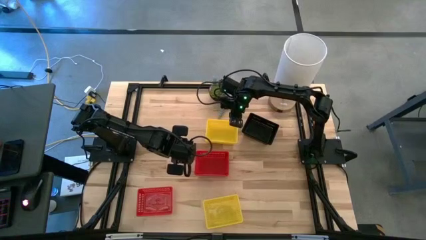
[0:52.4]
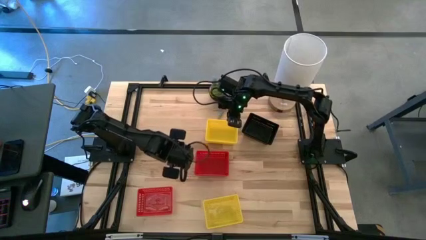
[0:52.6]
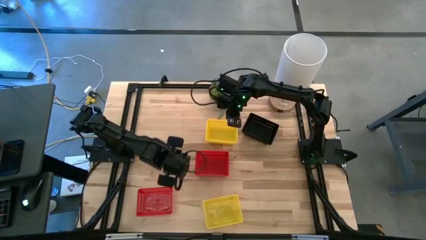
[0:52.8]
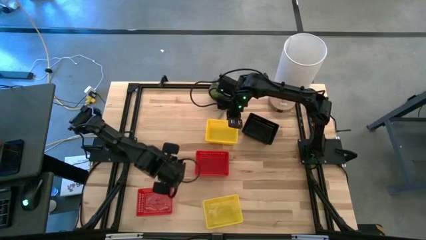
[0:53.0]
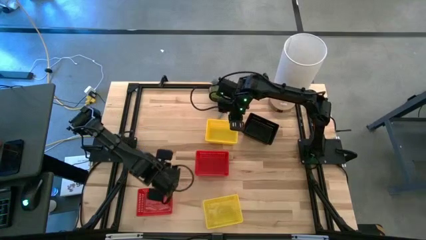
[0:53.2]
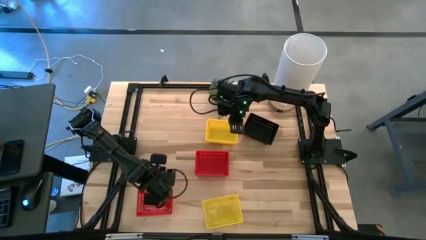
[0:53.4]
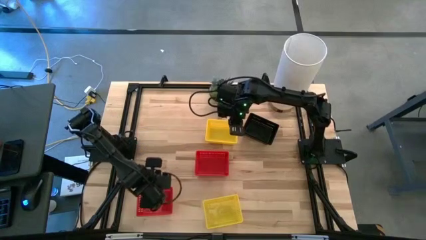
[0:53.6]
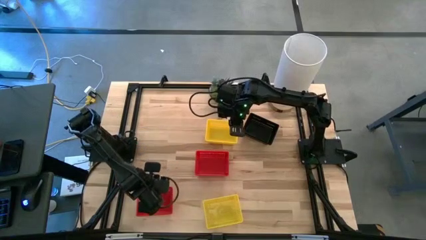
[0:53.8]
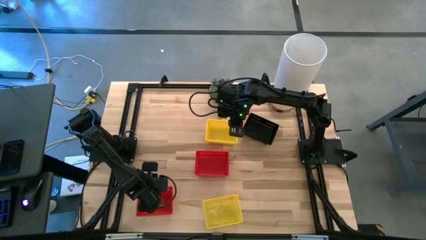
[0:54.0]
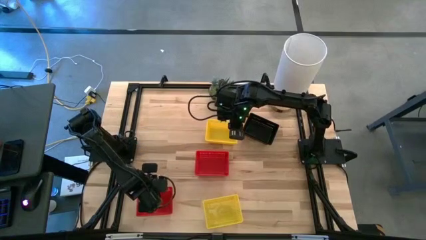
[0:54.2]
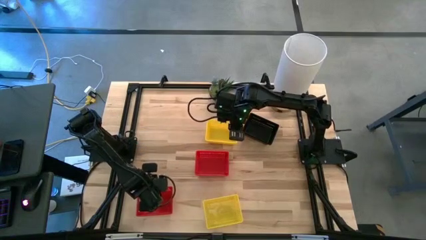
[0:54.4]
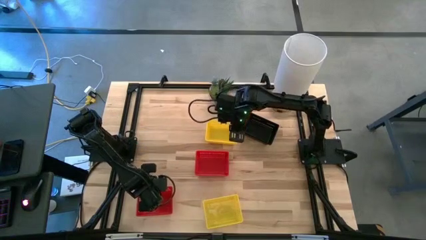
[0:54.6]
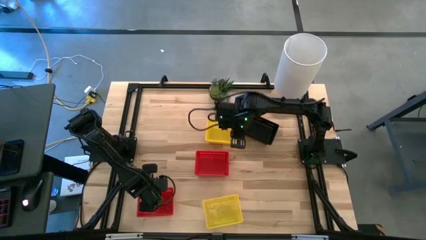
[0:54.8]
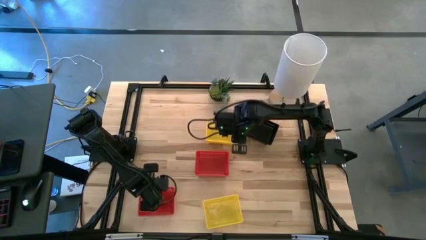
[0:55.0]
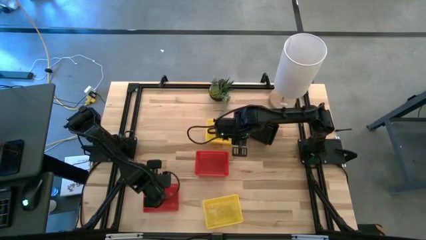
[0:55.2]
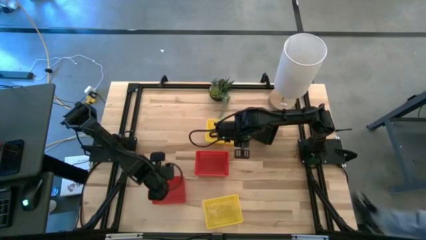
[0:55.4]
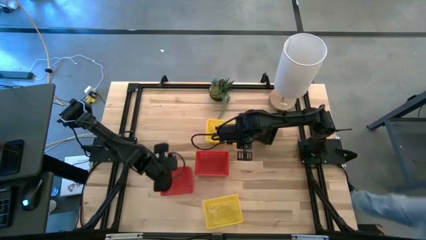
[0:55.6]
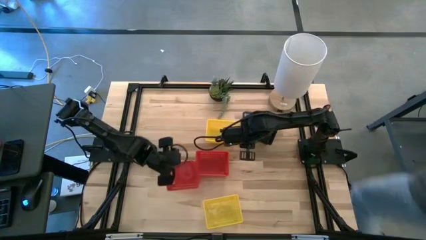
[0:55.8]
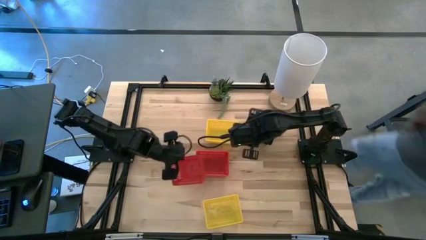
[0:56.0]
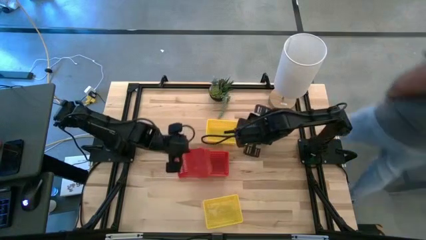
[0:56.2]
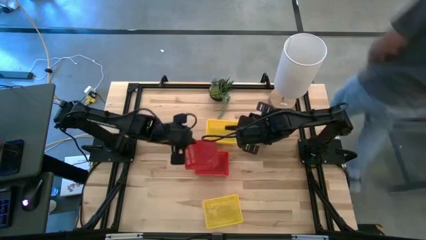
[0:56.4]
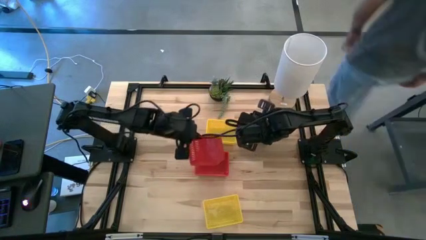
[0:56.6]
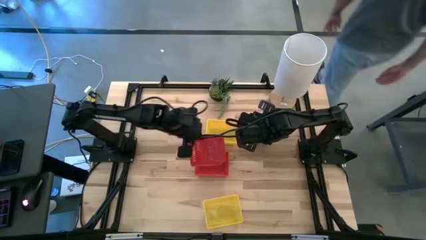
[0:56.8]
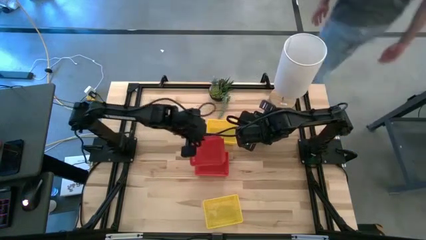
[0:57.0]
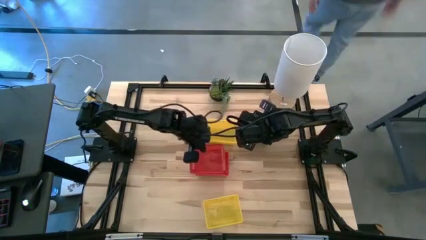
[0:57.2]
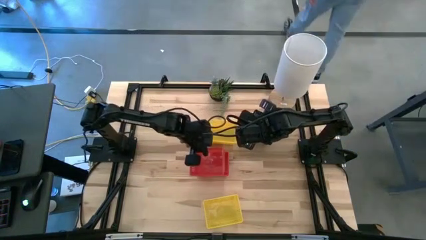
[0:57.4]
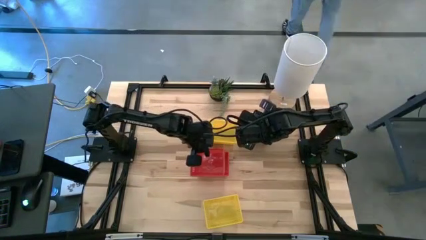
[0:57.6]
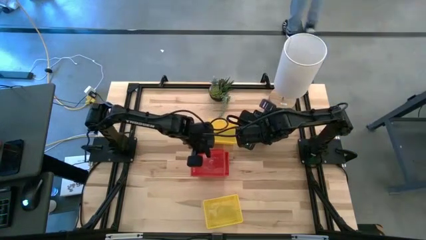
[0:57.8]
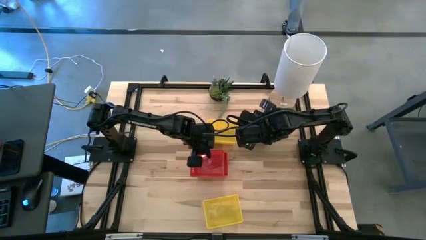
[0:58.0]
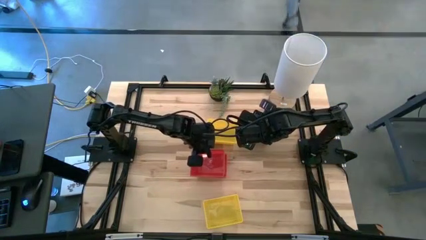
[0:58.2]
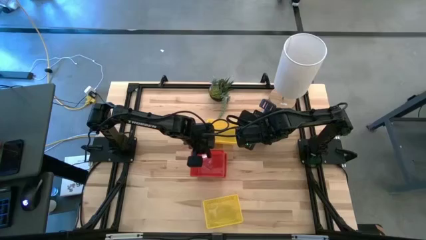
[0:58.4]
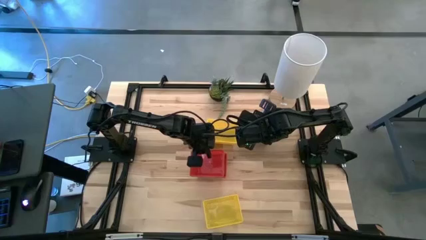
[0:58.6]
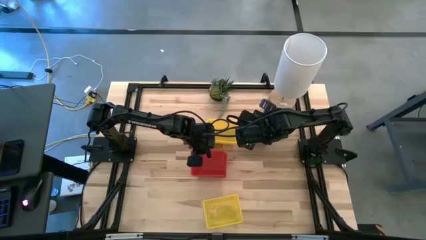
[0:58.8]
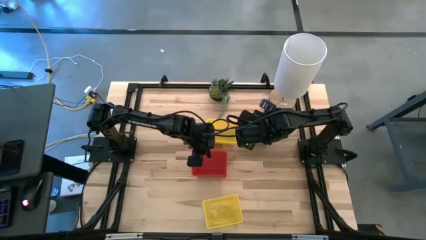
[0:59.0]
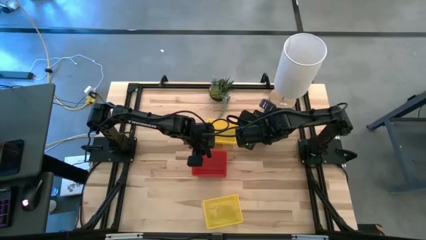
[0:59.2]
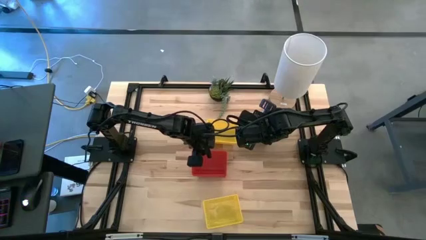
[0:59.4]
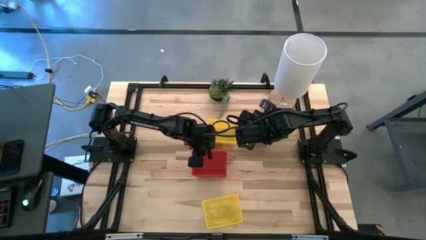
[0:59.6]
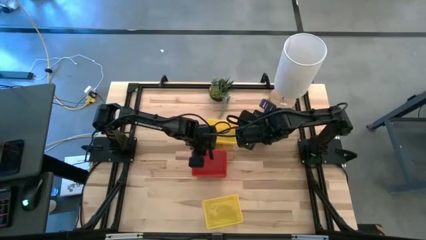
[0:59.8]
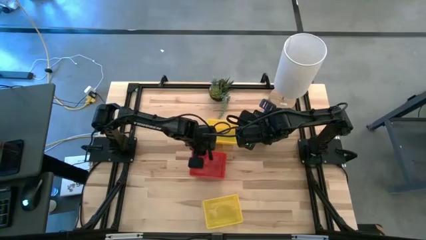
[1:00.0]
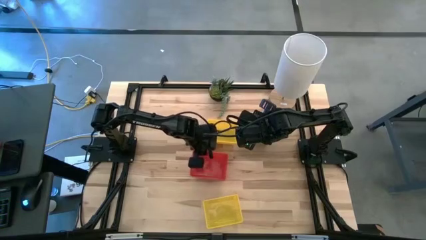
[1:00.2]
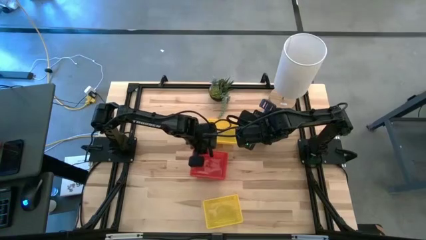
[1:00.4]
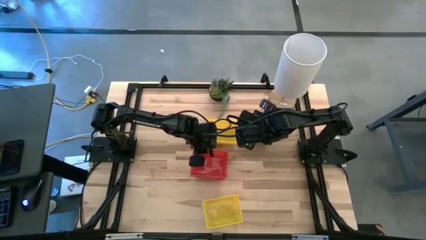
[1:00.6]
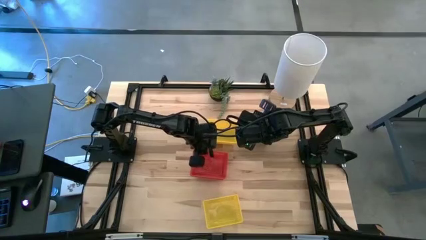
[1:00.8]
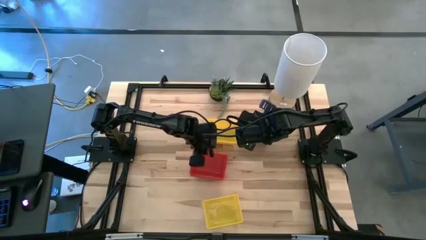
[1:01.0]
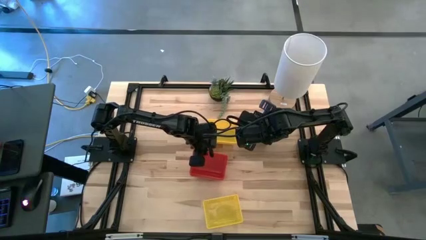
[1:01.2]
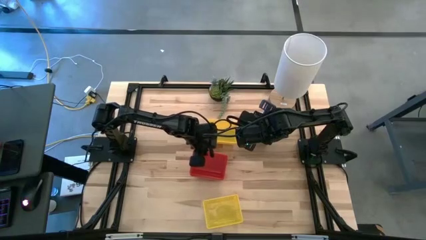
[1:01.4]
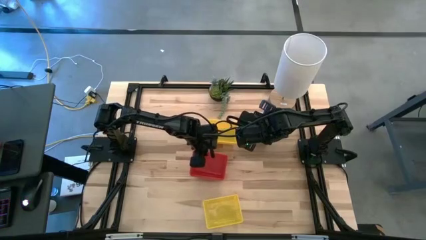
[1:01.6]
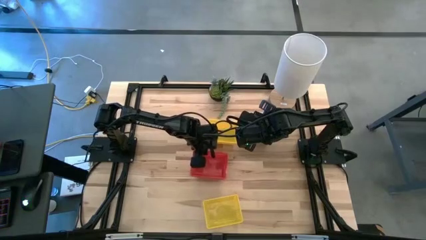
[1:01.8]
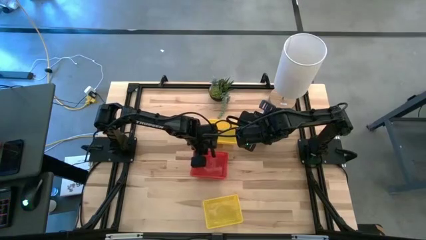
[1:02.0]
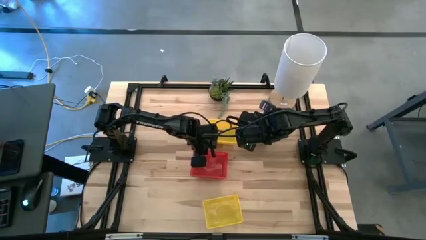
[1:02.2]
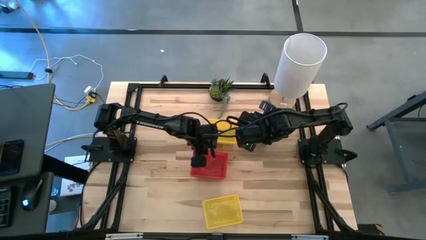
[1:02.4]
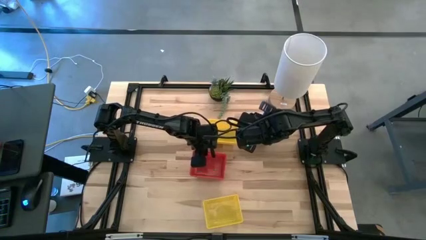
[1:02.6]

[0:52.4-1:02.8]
Stack the bottom red bin on the top red bin

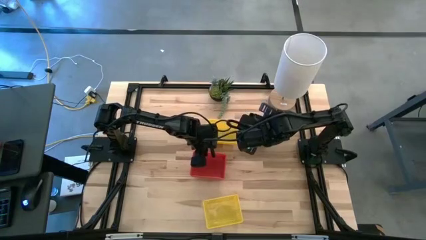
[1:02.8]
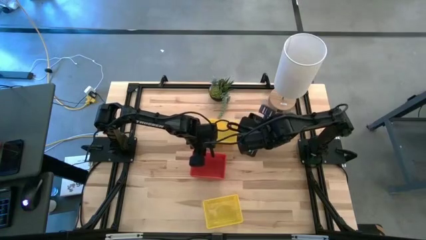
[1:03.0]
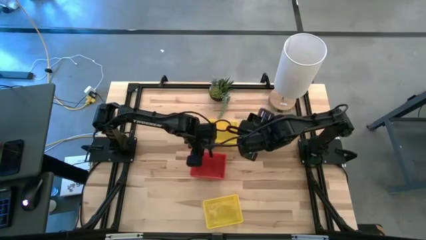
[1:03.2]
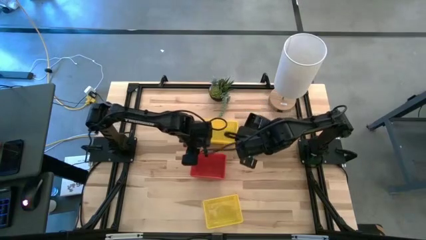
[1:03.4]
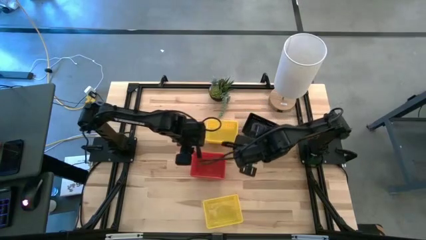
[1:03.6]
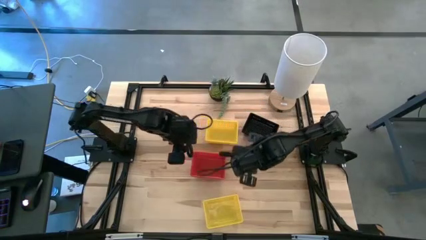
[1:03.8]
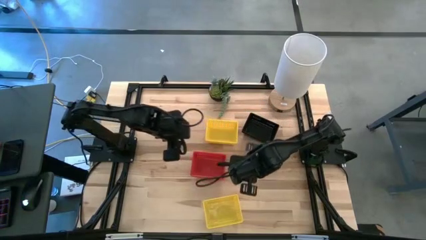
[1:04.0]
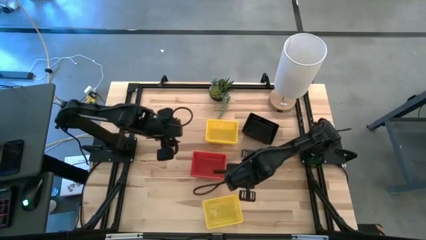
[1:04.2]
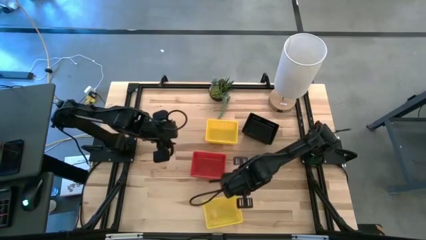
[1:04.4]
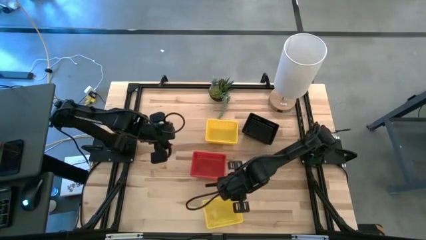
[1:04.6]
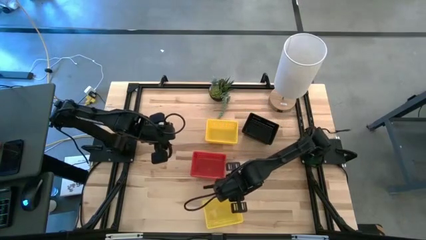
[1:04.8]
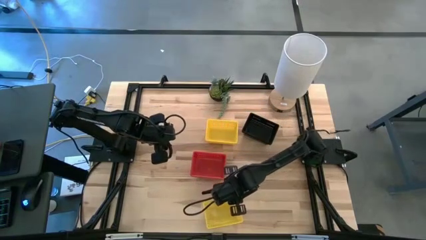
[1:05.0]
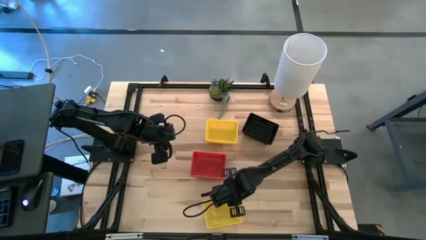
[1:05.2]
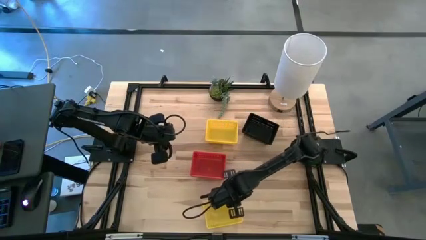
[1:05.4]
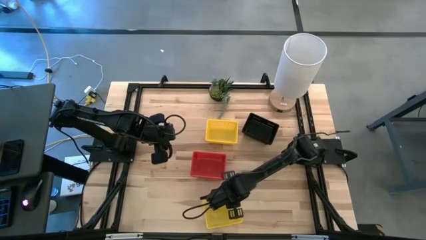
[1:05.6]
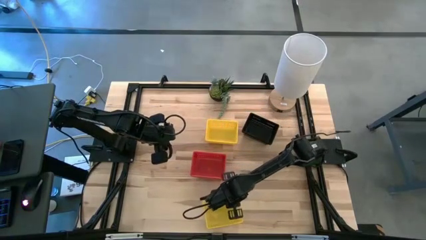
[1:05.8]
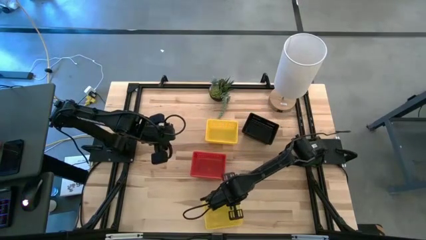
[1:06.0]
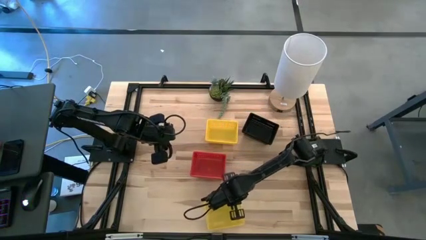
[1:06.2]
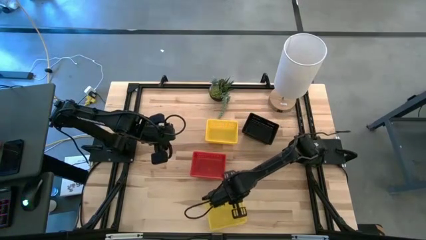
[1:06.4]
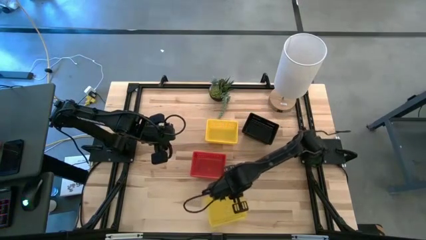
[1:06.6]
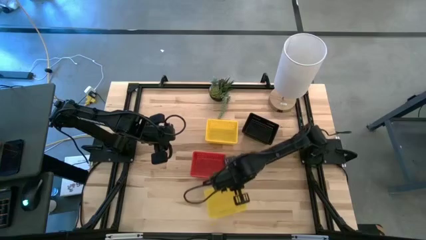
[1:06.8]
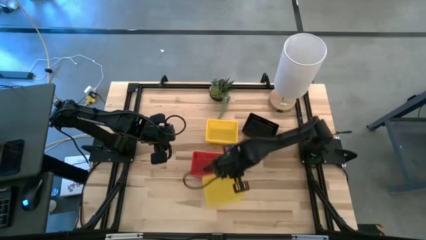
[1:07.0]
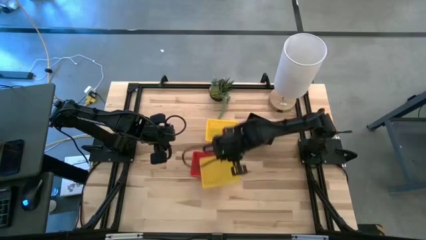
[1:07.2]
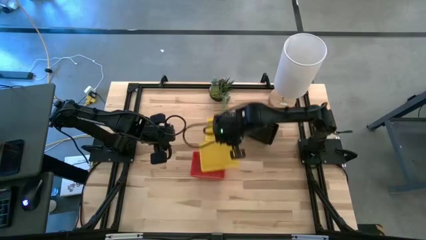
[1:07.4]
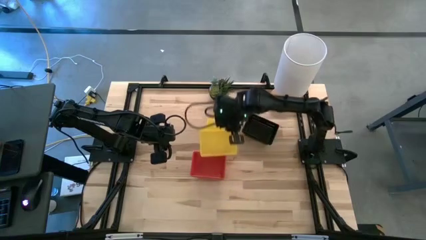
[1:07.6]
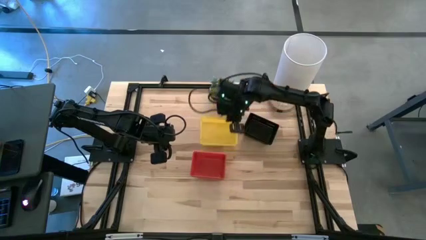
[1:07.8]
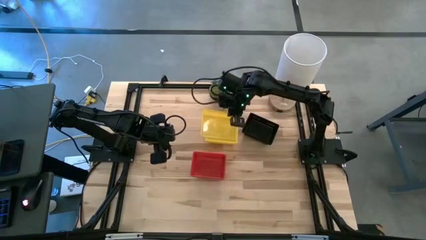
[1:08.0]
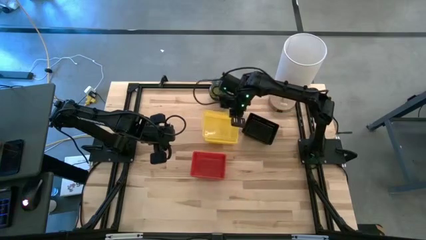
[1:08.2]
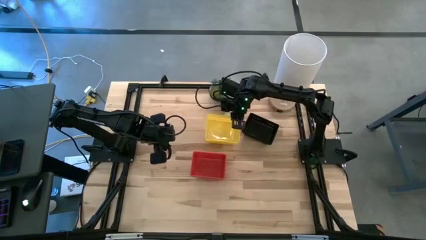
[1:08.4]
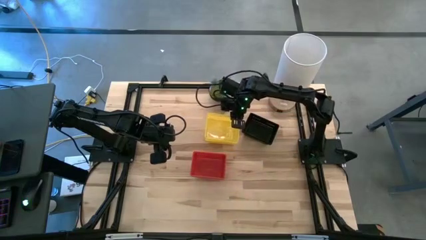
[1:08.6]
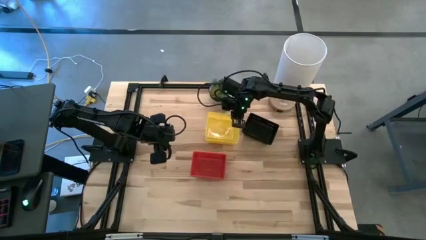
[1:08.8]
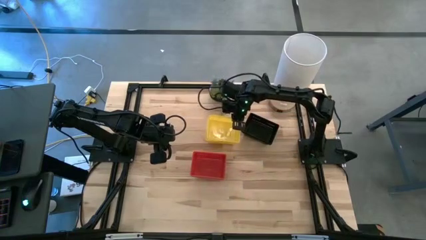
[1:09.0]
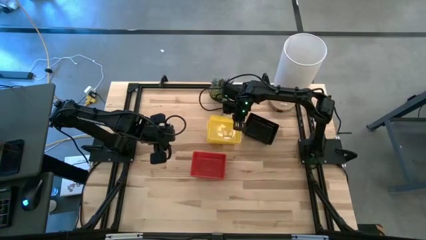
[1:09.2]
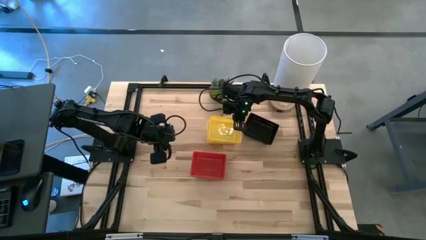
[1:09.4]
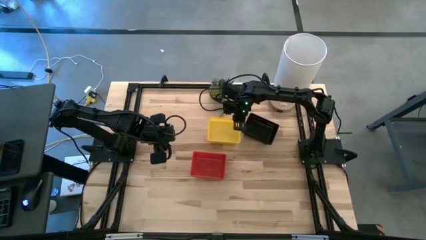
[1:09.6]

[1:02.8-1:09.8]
Stack the bottom yellow bin on the top yellow bin
